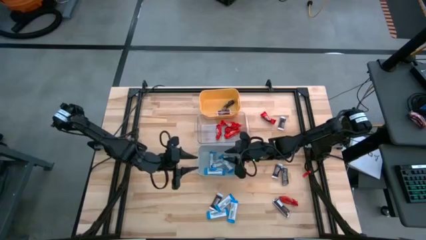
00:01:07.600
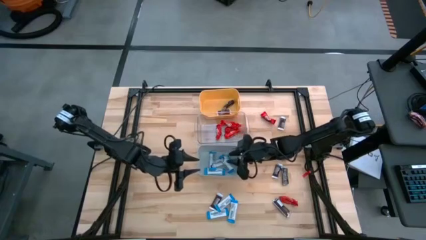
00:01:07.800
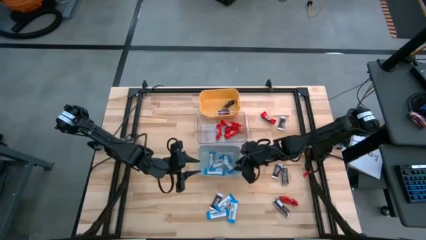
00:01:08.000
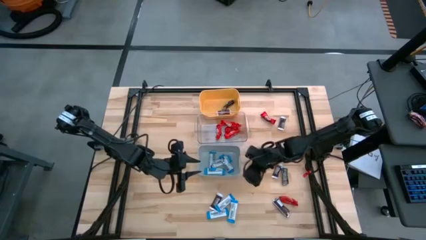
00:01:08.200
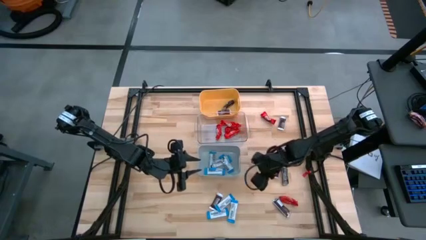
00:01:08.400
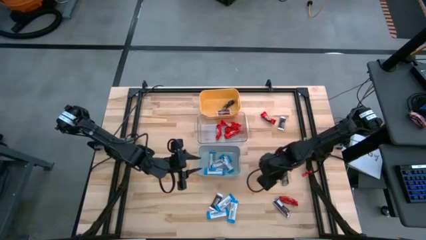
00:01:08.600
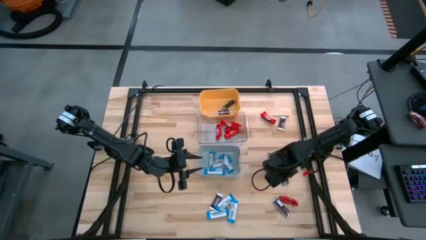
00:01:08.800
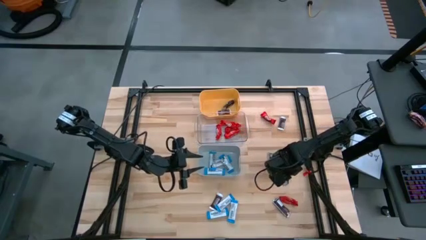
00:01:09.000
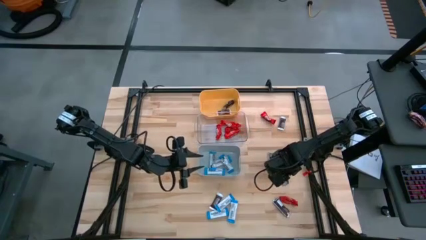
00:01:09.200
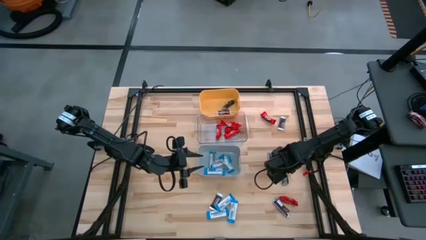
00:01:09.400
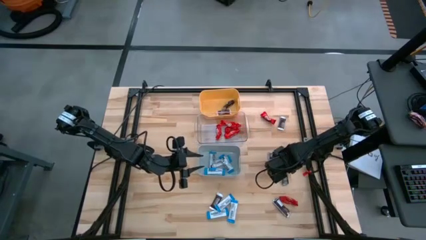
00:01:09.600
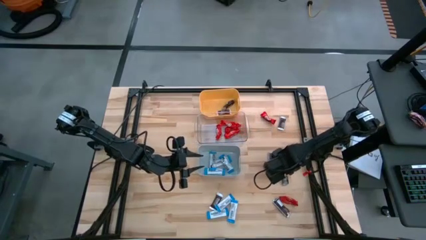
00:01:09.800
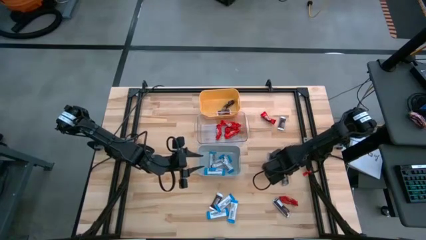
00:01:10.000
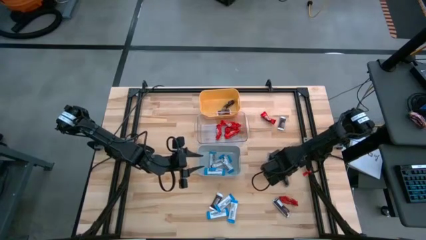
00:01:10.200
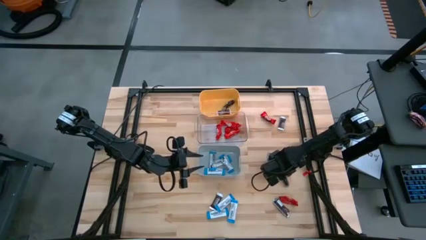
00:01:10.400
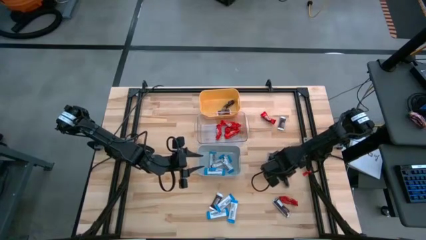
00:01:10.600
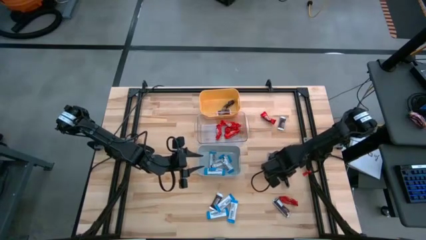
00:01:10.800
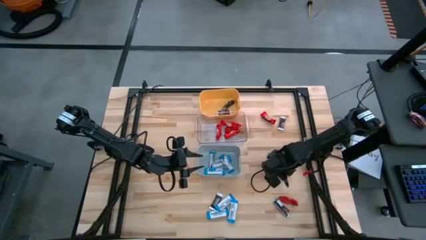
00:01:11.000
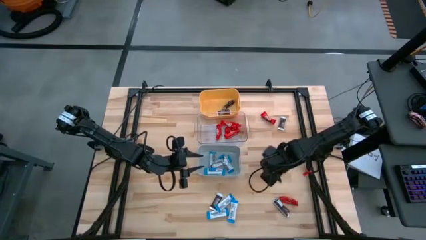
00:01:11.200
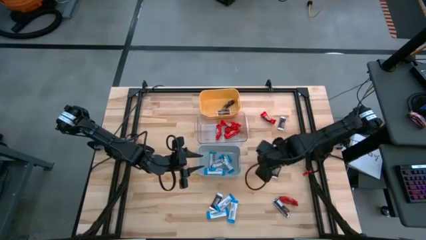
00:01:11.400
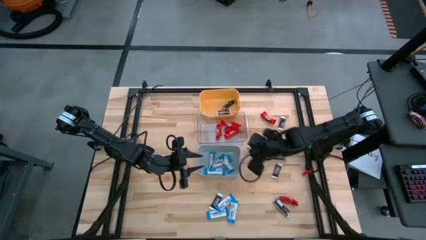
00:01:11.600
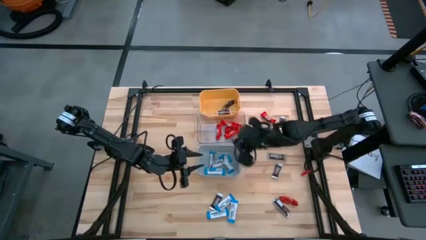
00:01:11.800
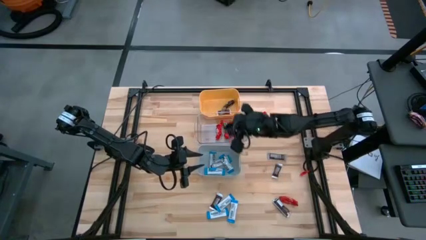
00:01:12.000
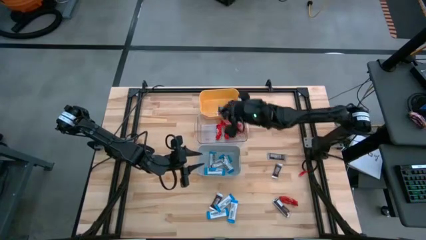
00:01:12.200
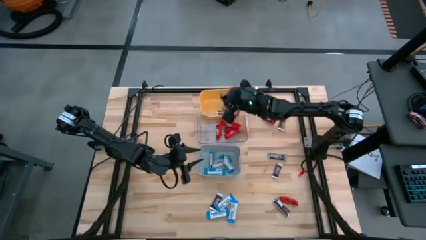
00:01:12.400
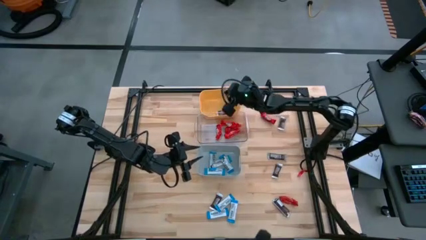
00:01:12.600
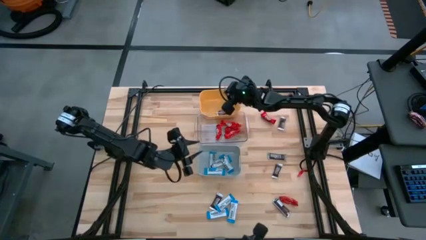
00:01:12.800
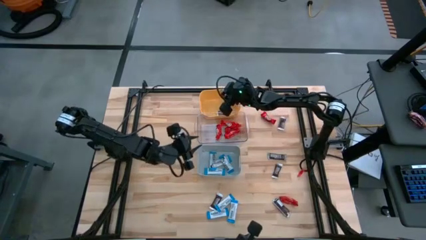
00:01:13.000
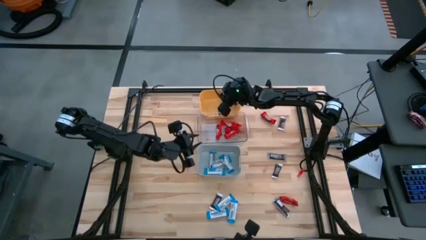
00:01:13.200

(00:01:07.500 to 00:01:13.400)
Task: Organize candy in baskets
Put the brown chocolate bar into the yellow bin

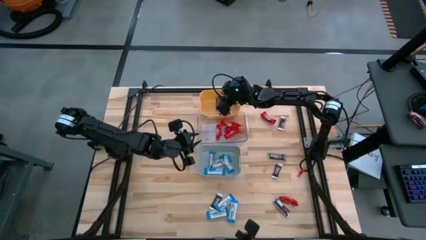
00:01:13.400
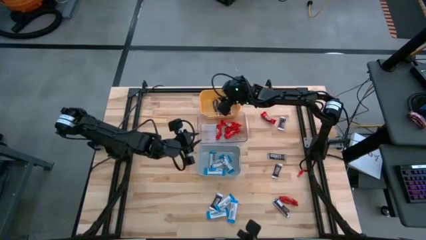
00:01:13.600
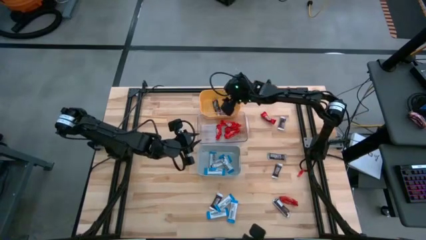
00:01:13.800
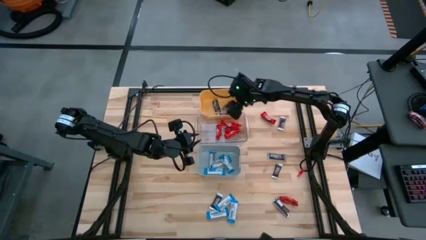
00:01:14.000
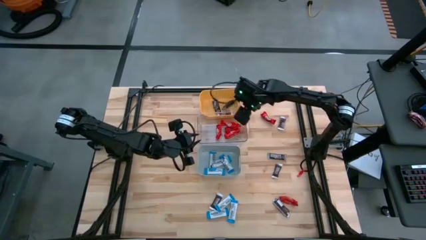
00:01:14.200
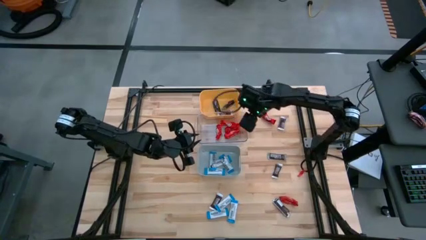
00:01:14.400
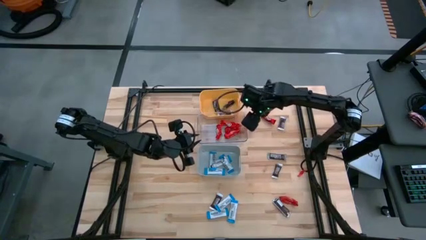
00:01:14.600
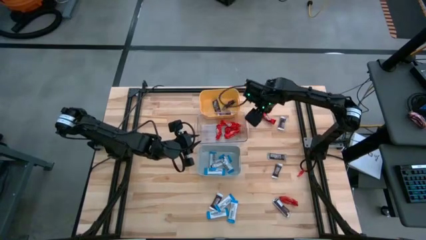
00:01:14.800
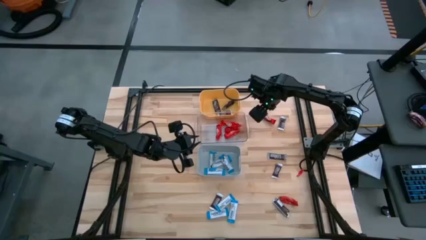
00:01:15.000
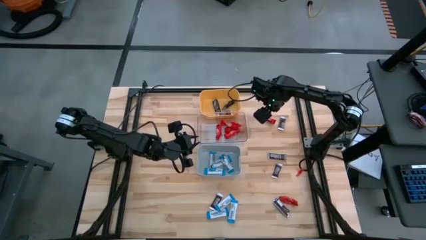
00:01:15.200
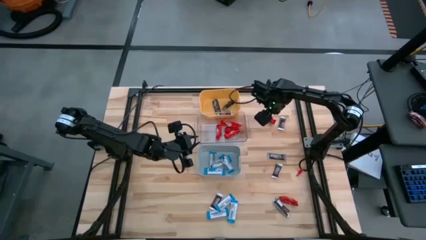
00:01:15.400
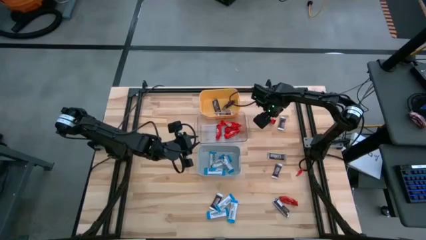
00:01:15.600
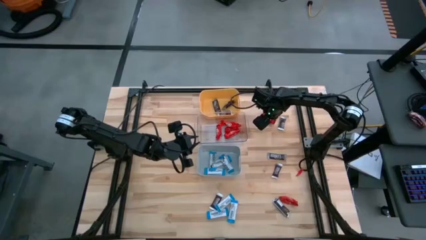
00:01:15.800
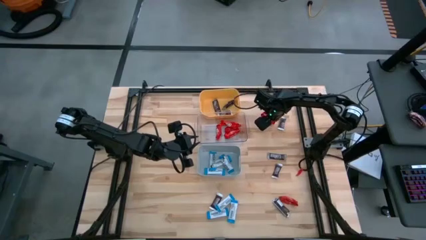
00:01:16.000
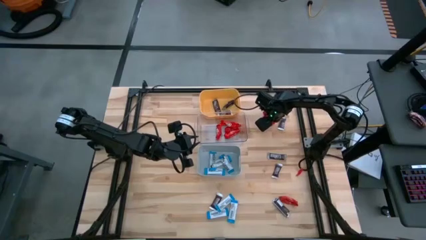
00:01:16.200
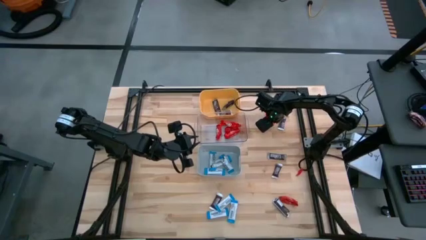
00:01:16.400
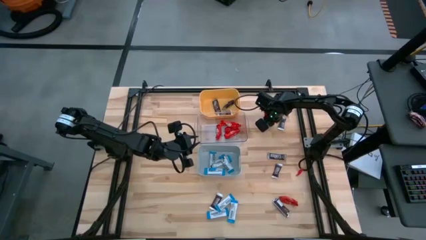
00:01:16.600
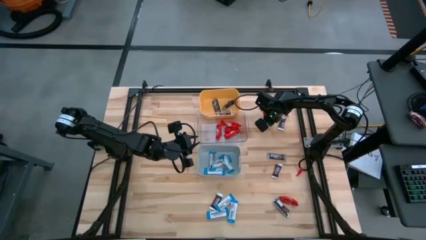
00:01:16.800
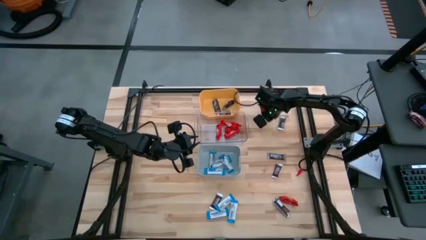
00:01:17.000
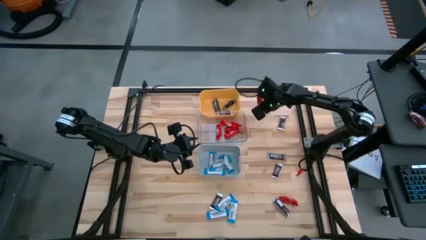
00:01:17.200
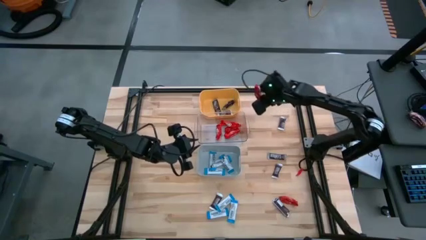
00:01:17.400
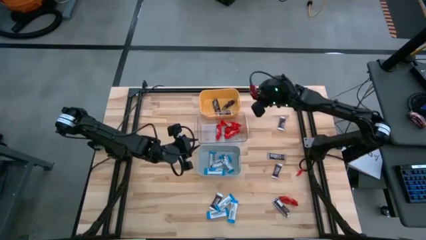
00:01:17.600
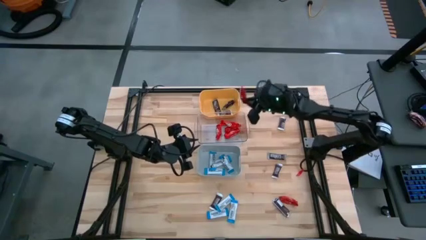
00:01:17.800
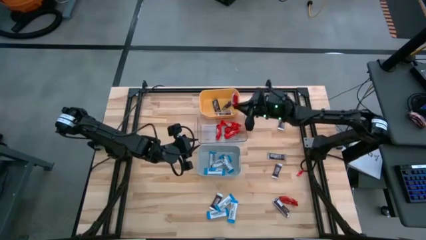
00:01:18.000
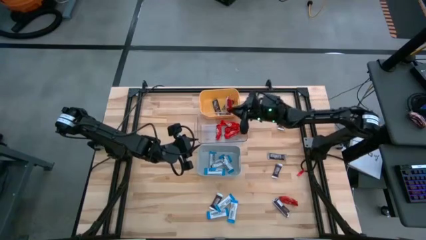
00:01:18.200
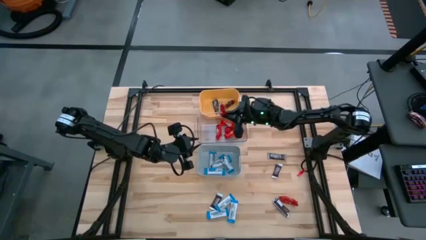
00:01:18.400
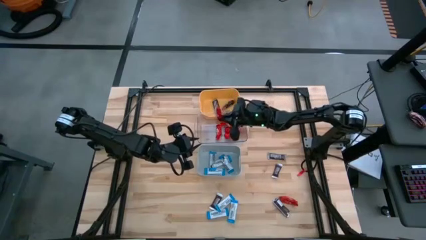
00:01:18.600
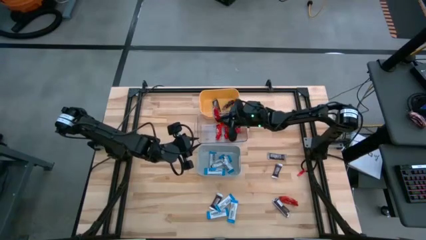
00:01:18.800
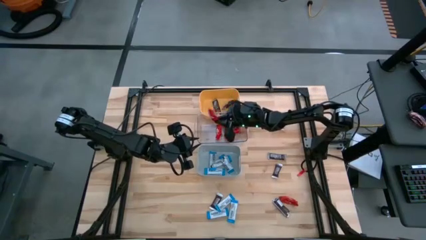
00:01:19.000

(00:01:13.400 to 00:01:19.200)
Put the red chocolate bar into the transparent bin

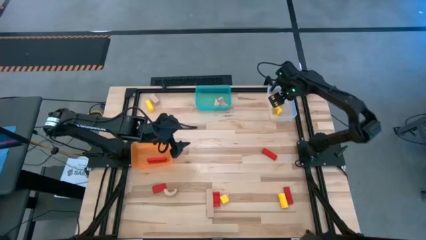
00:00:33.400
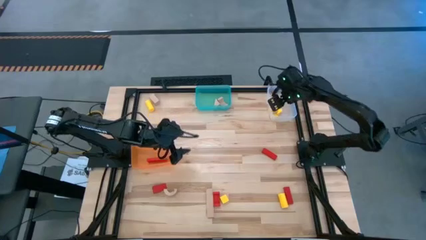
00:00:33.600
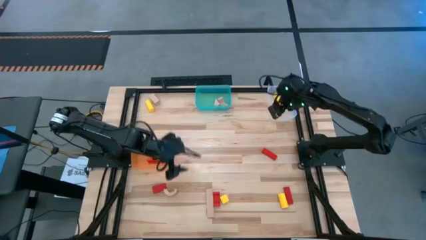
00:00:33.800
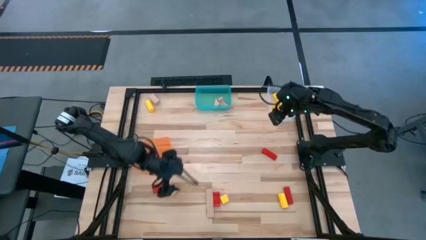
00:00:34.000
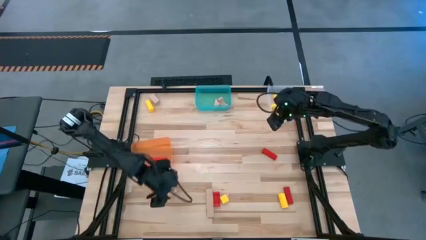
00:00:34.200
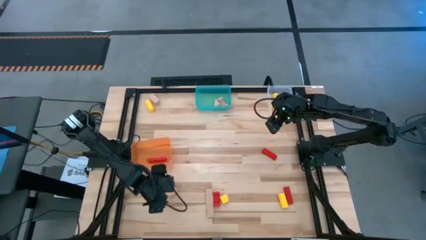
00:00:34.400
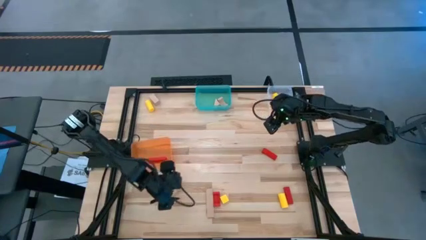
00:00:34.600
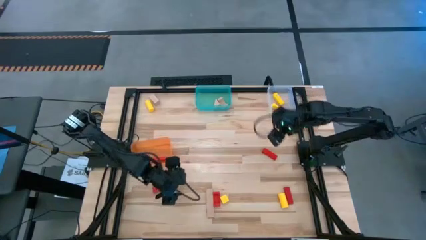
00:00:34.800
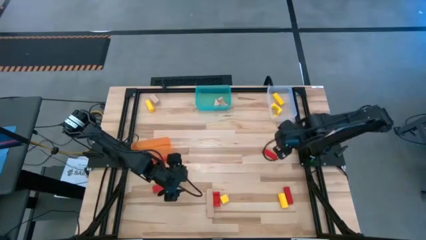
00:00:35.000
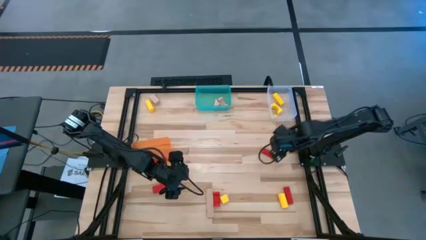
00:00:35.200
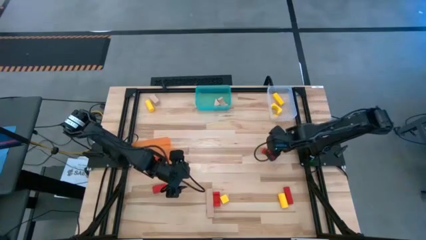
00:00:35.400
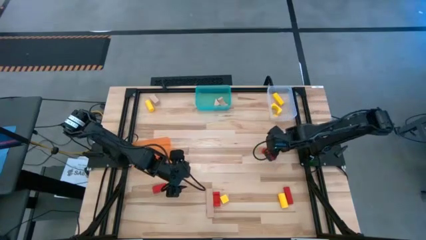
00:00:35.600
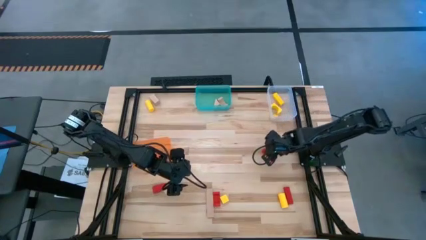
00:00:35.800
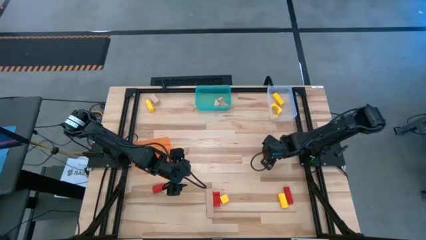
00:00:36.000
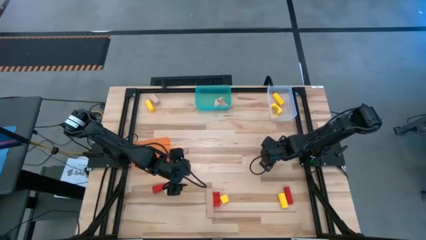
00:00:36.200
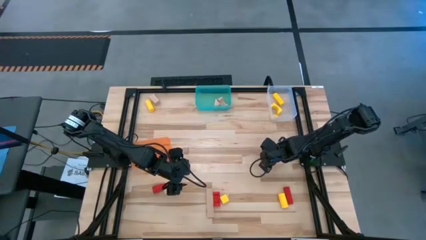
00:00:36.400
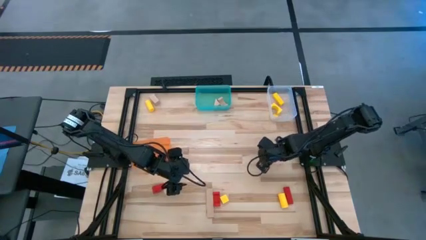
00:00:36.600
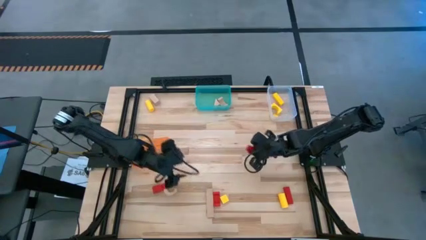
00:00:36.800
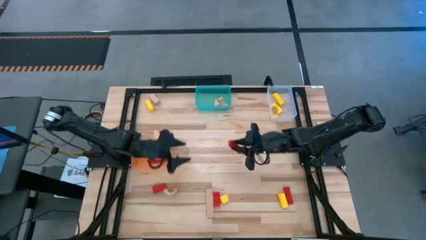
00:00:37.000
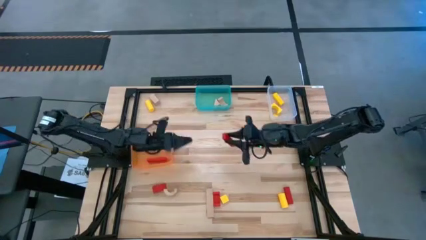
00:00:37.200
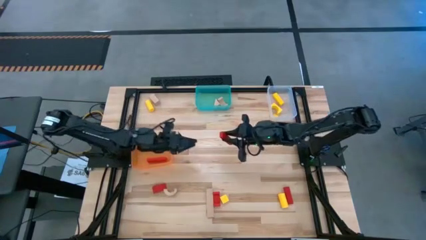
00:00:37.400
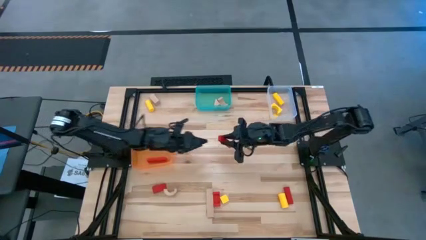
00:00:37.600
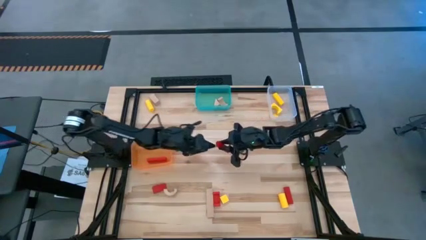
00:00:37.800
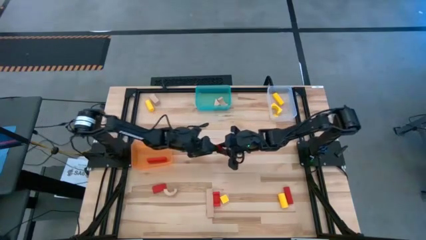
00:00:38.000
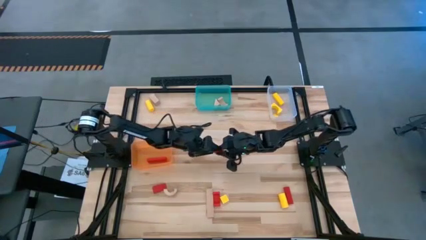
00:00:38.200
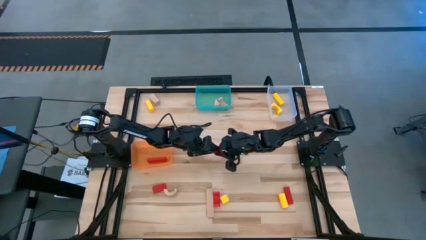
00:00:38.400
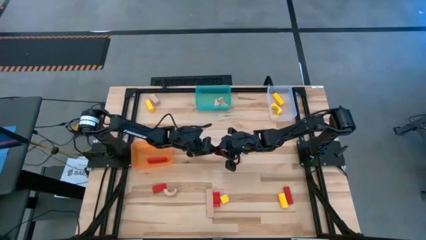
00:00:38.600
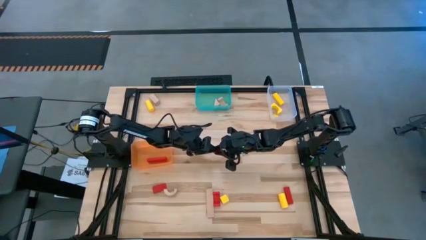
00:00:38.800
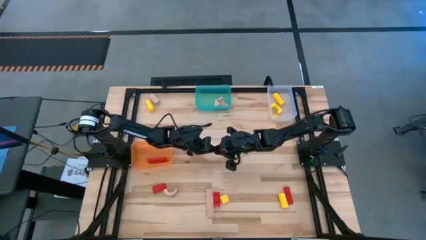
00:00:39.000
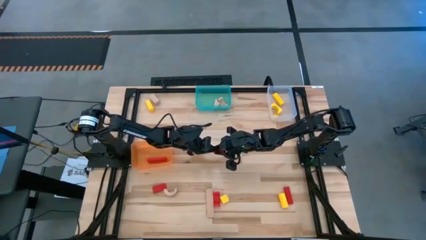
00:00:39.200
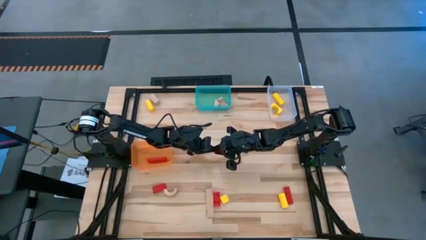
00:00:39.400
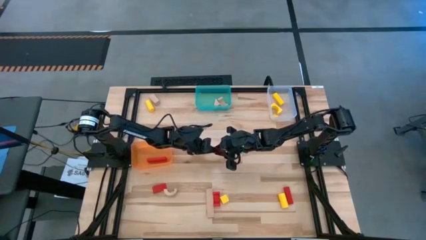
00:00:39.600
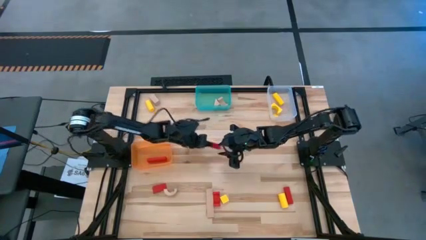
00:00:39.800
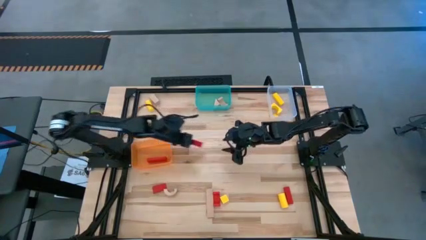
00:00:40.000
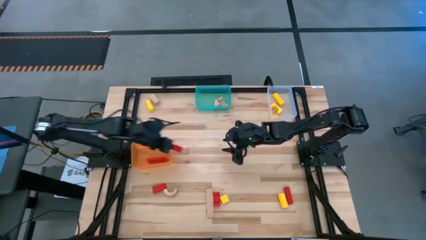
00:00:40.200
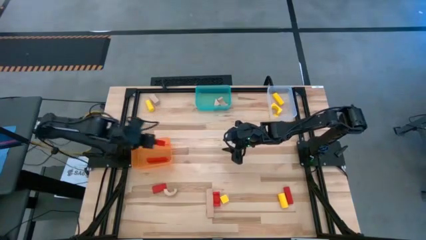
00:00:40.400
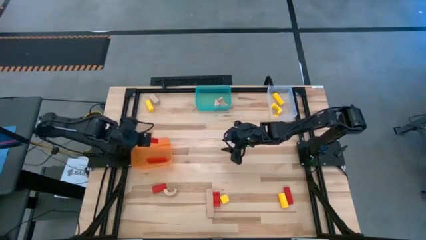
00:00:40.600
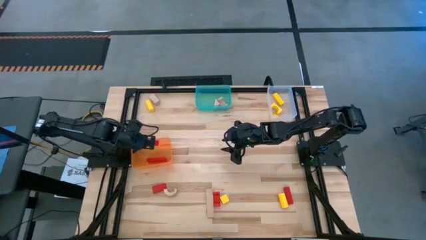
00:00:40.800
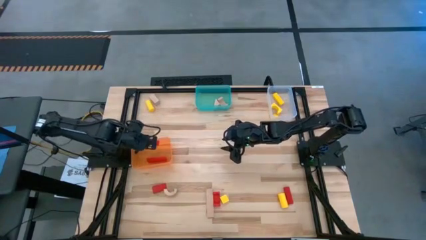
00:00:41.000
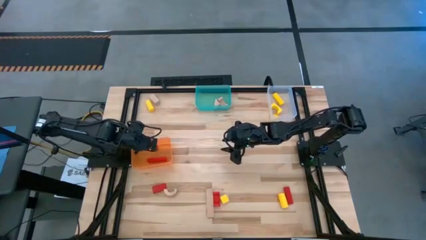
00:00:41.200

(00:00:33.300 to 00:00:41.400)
Task: Sort & place blocks by color
Put the red block into the transparent orange bin
